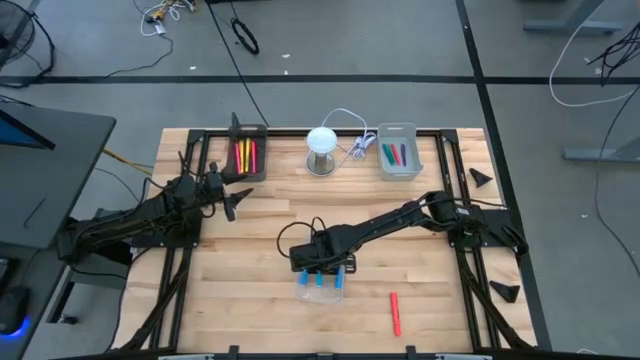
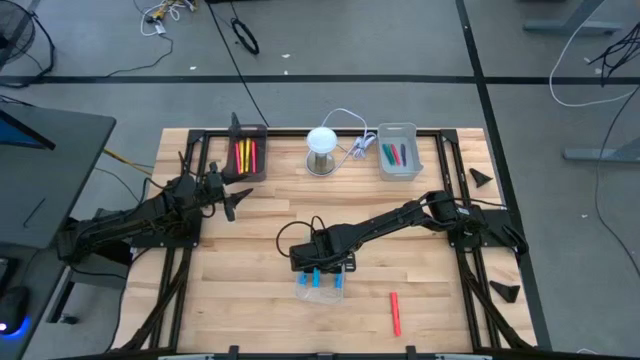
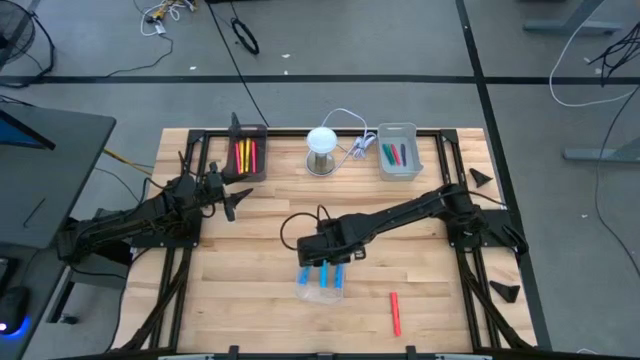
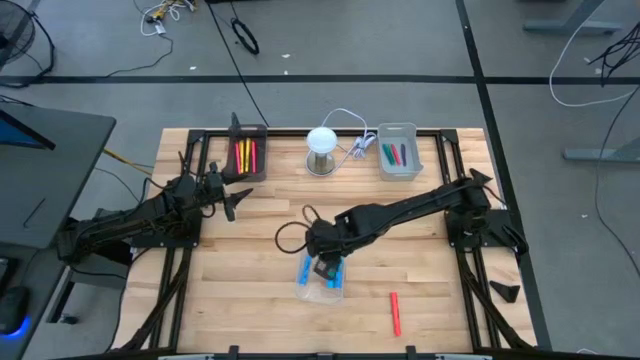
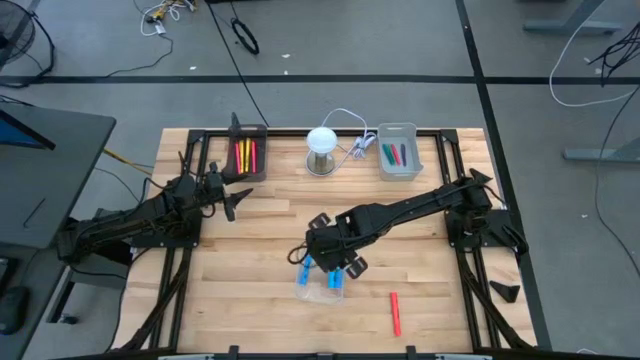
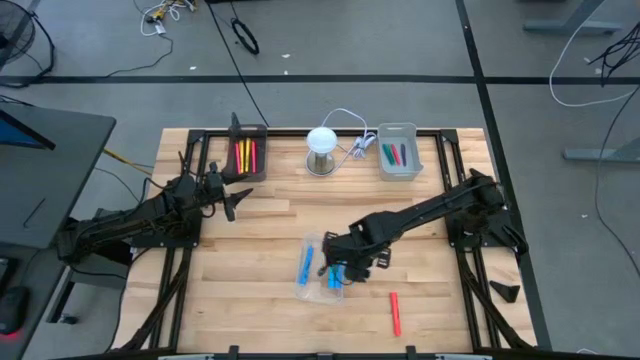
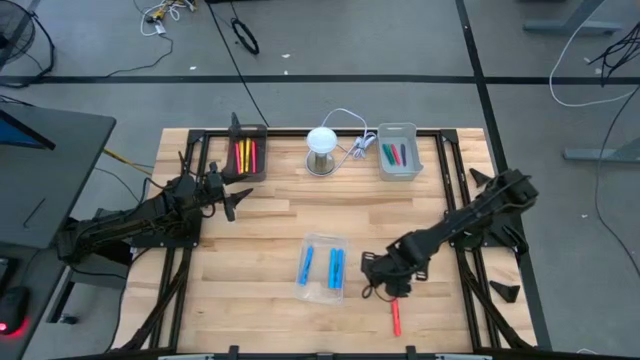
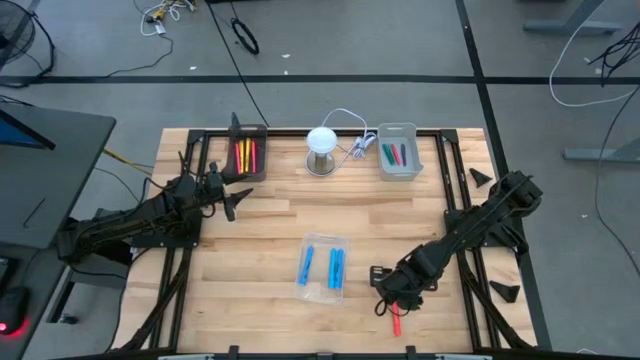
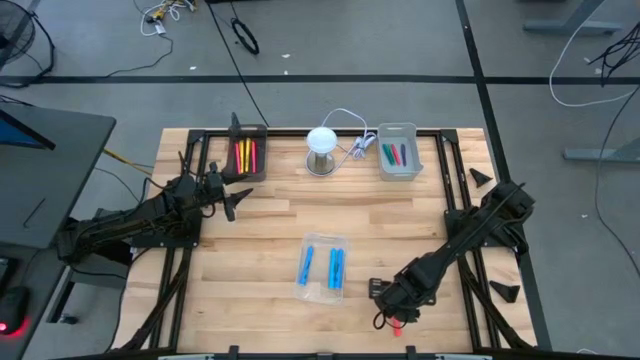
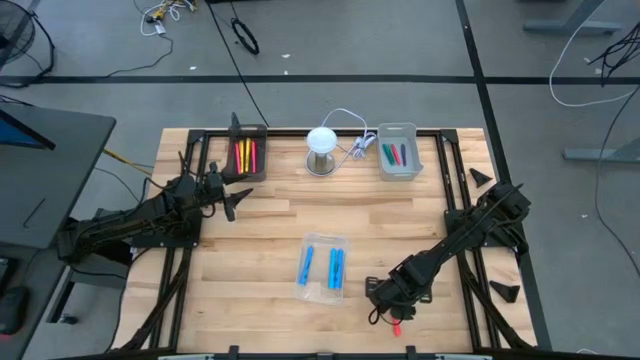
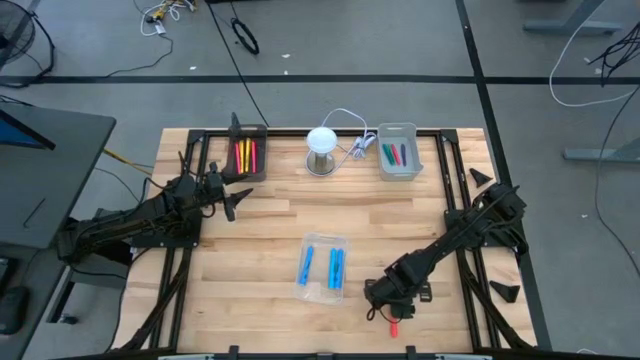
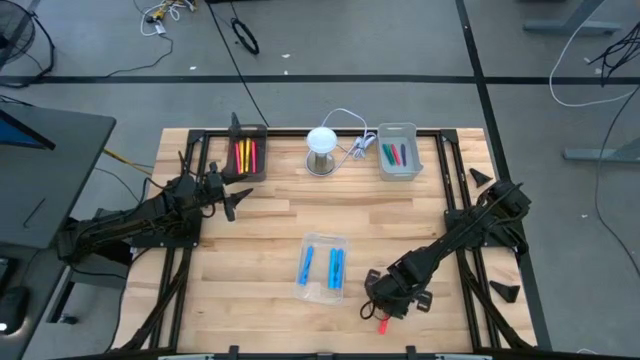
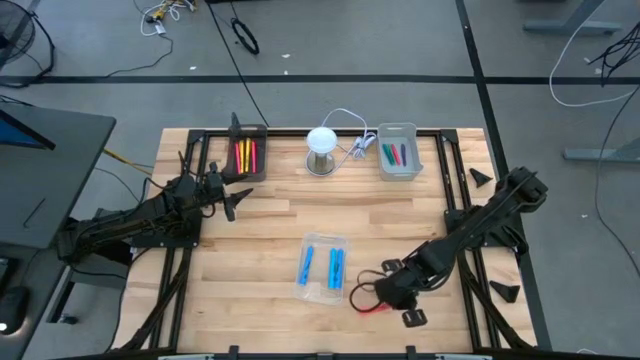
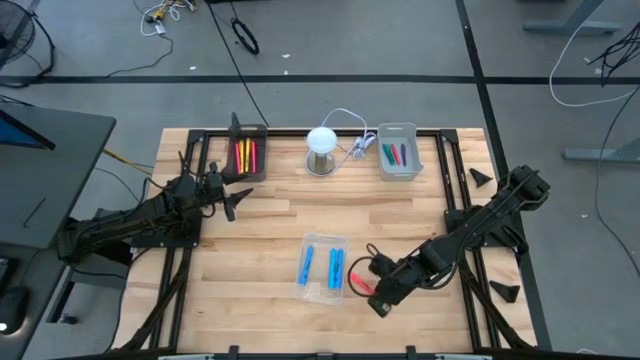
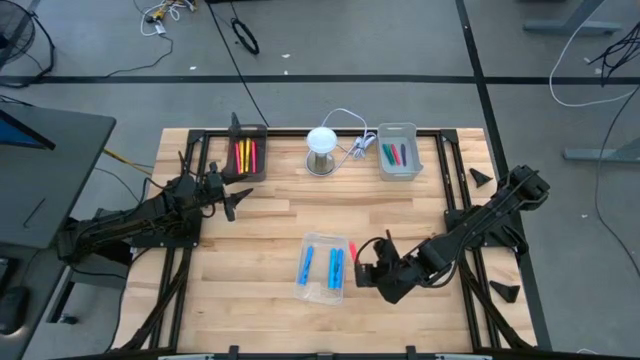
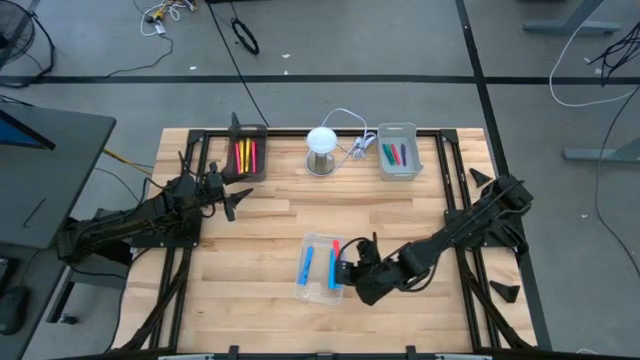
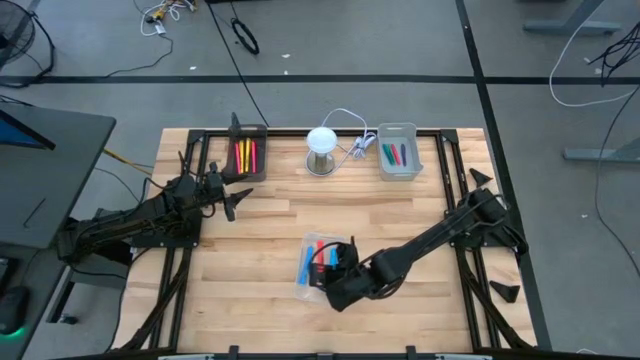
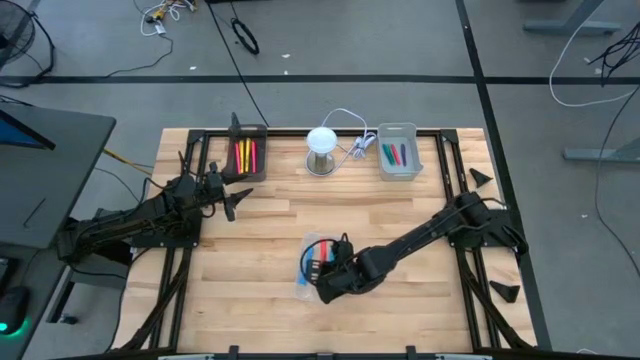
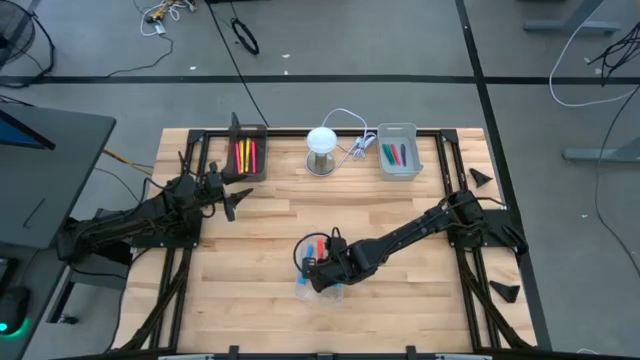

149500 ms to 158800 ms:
Task: Pick & Place Markers
Put the pink highlighter into the transparent bin

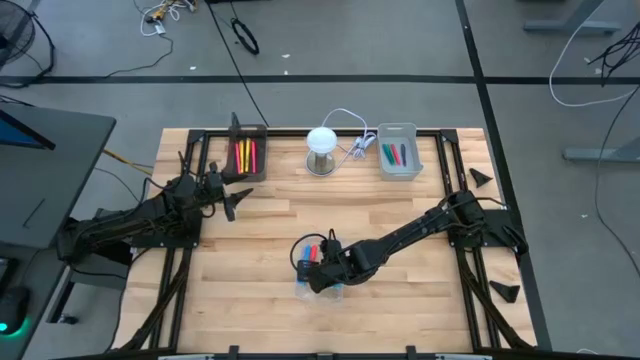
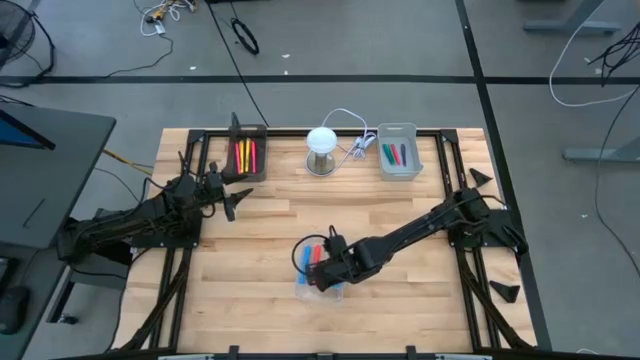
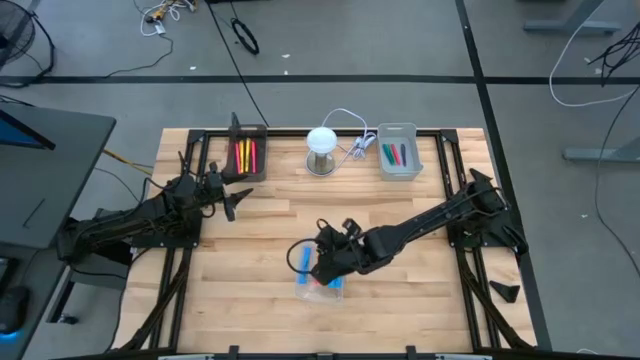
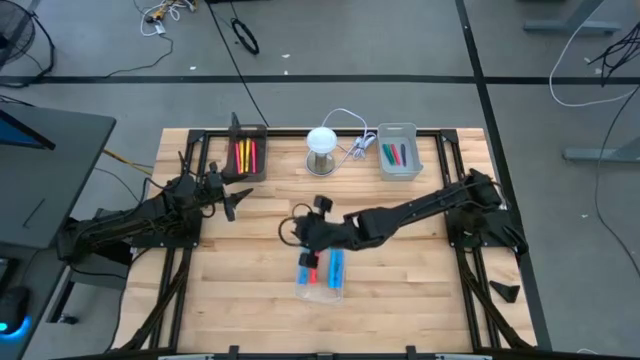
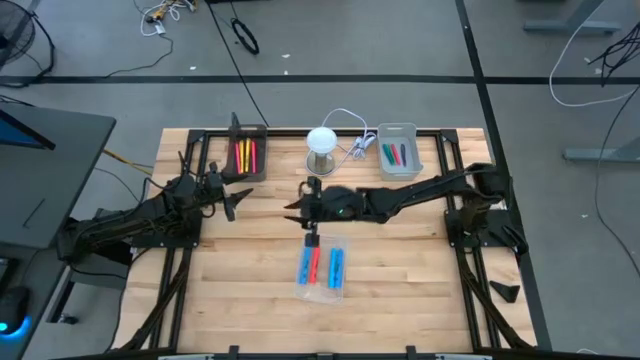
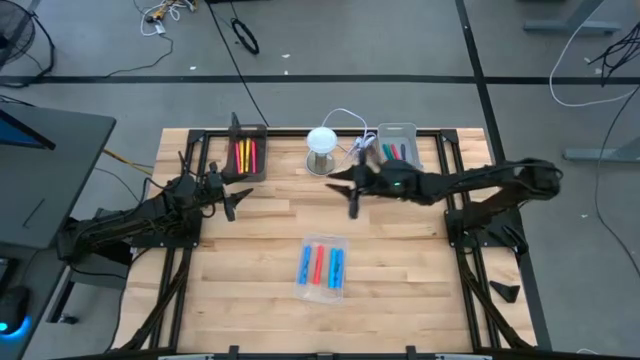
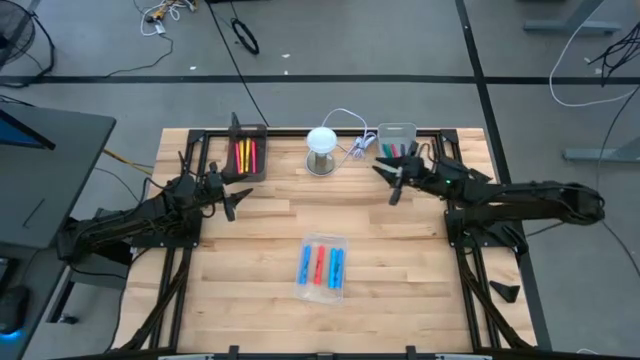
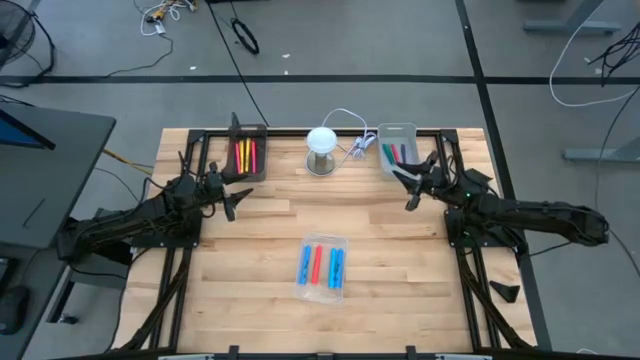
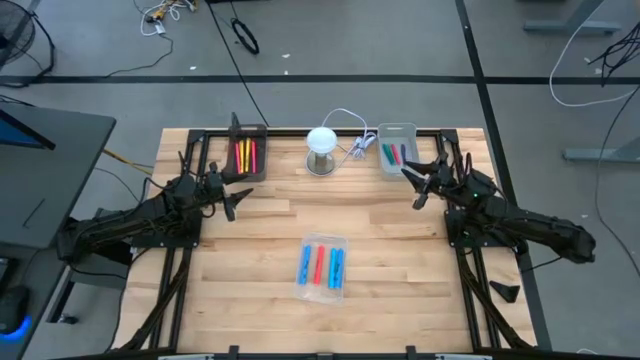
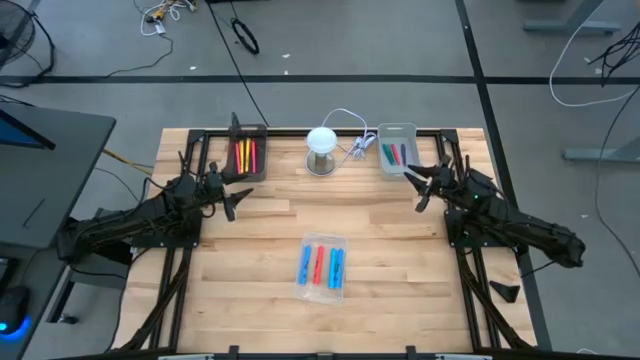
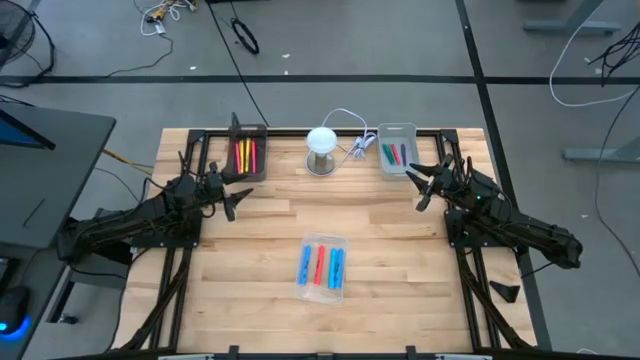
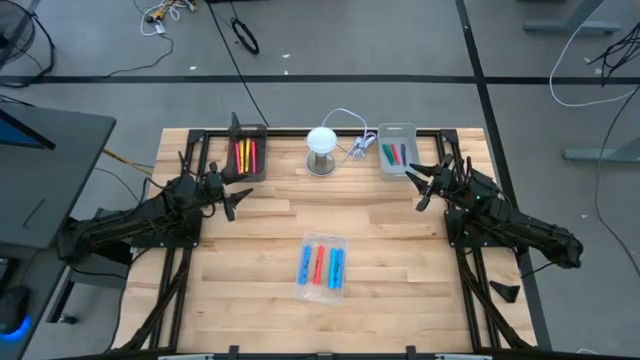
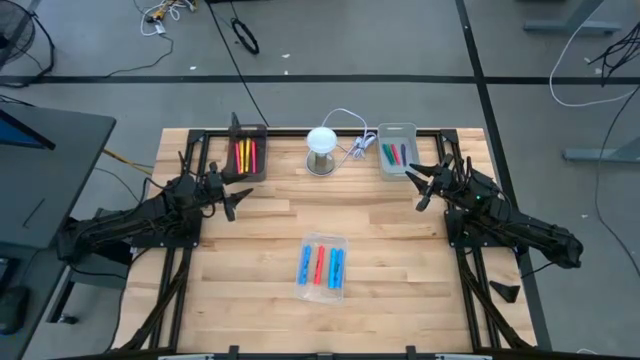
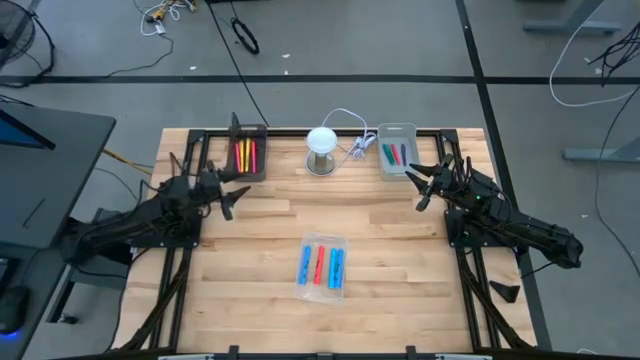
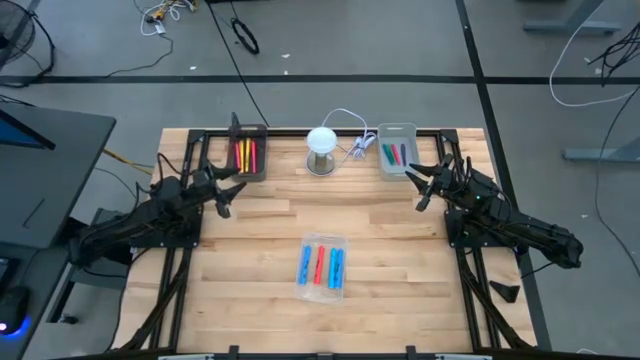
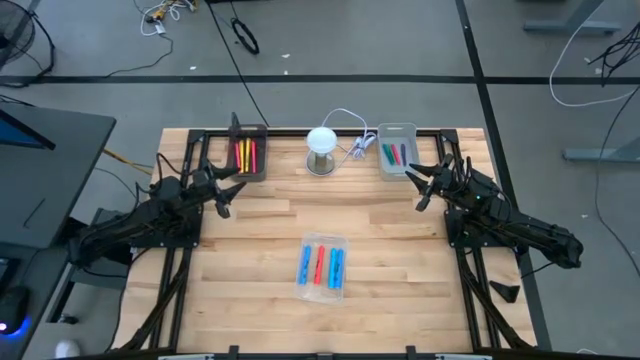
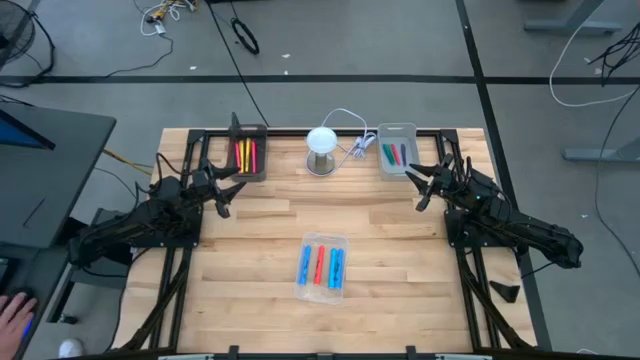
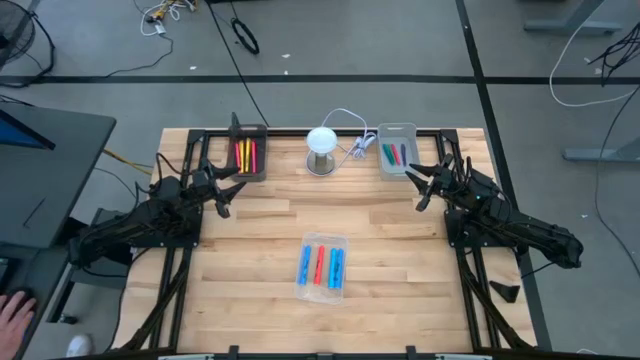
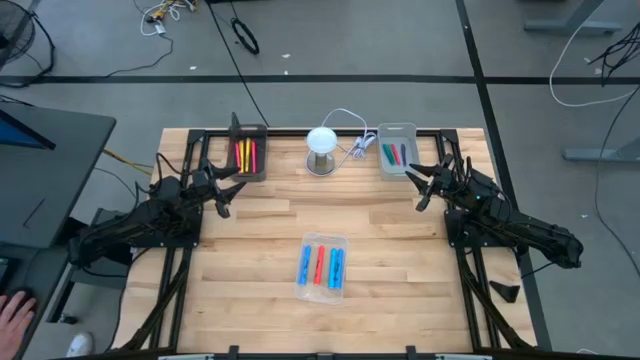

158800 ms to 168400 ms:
Return to Home Position
